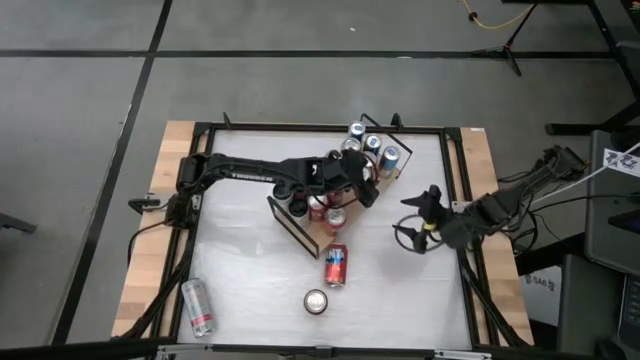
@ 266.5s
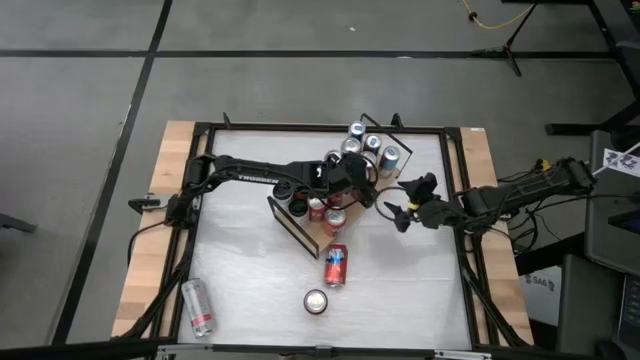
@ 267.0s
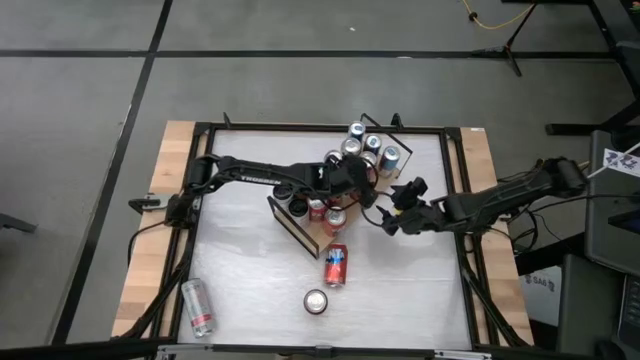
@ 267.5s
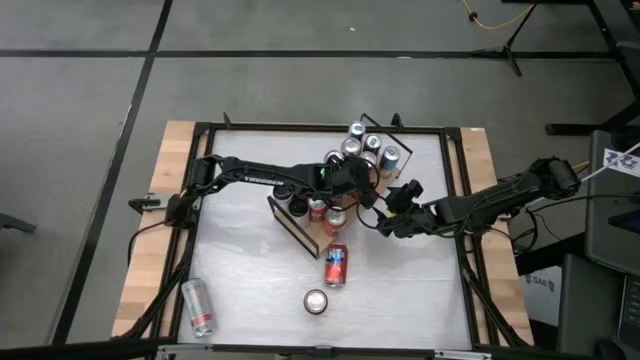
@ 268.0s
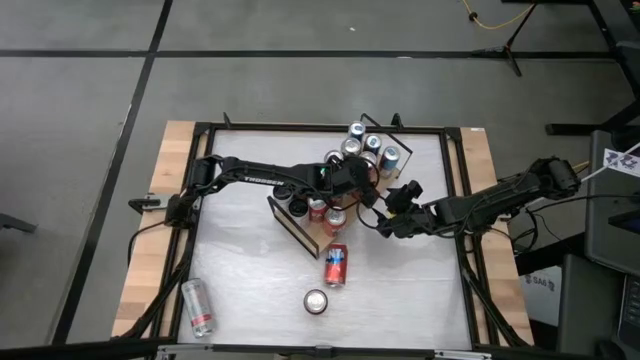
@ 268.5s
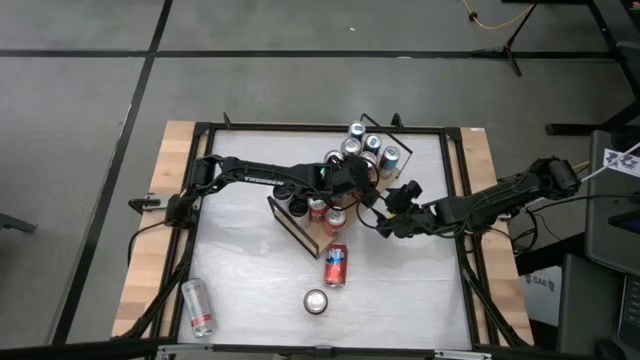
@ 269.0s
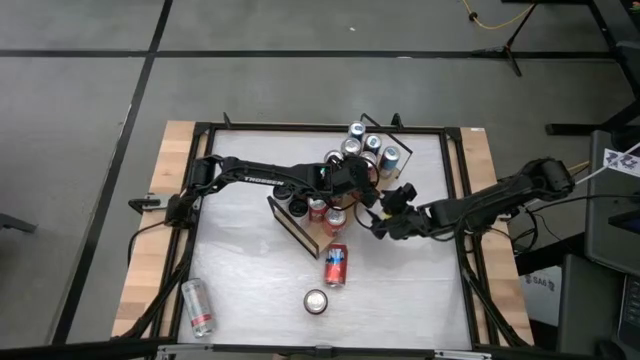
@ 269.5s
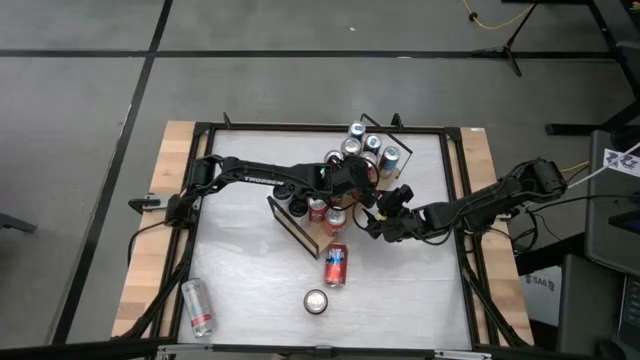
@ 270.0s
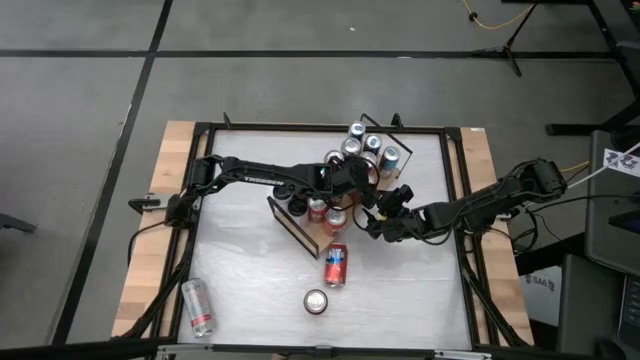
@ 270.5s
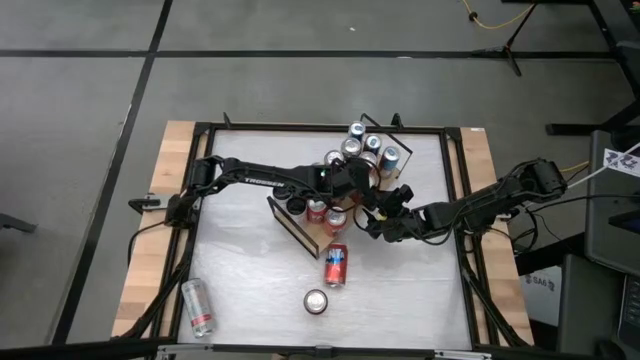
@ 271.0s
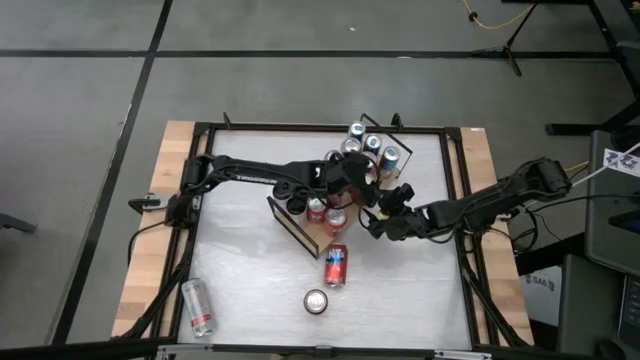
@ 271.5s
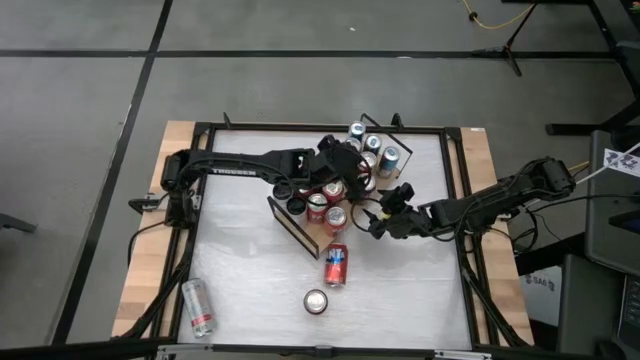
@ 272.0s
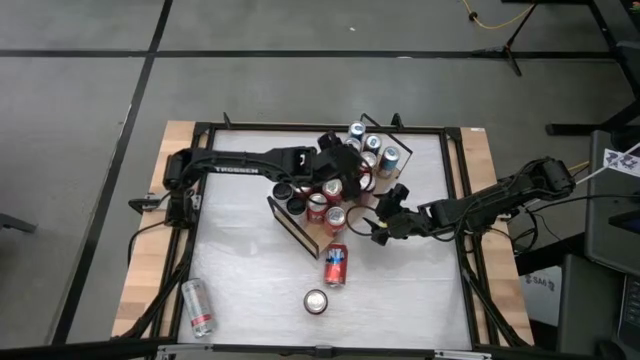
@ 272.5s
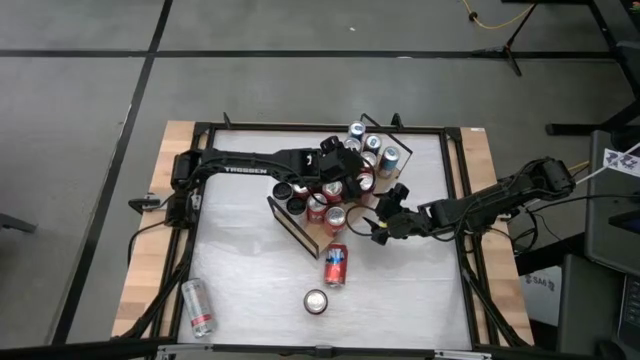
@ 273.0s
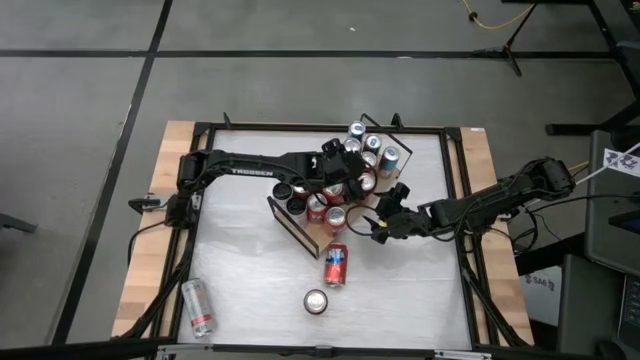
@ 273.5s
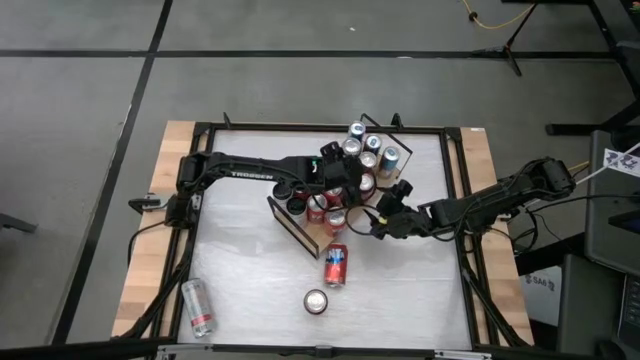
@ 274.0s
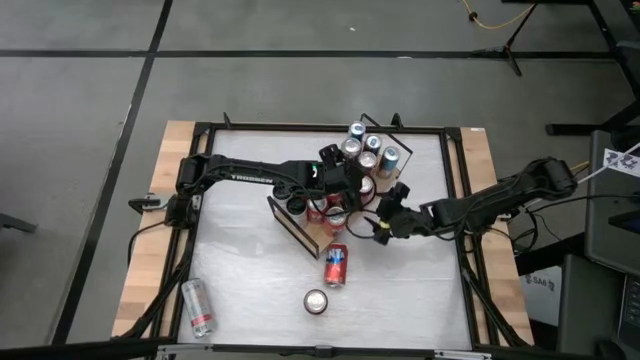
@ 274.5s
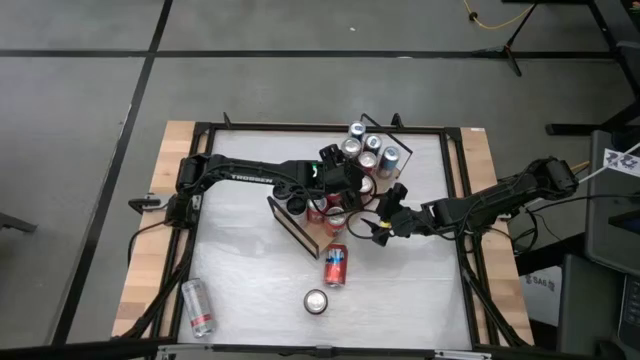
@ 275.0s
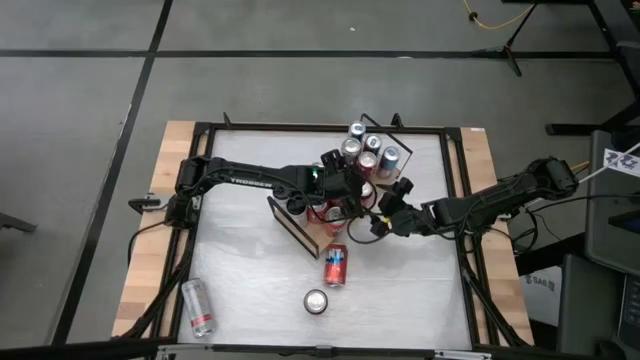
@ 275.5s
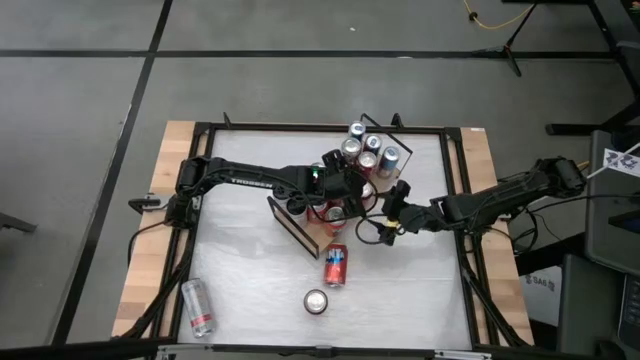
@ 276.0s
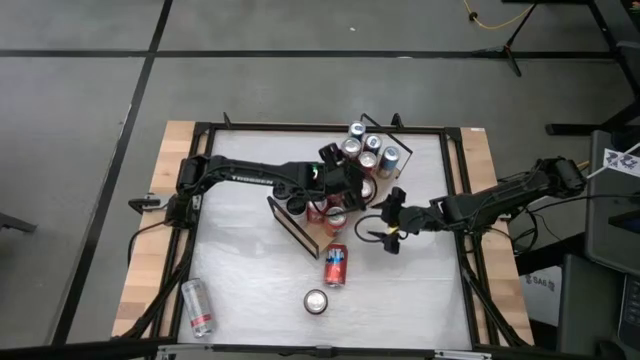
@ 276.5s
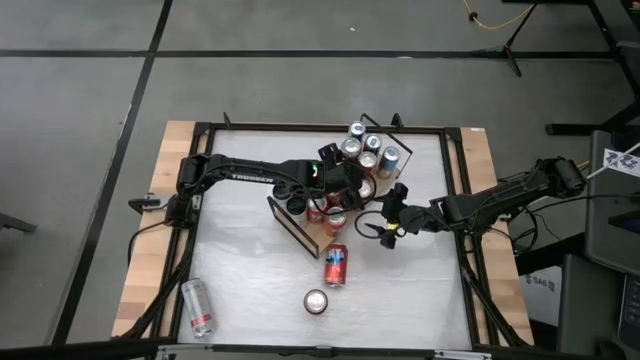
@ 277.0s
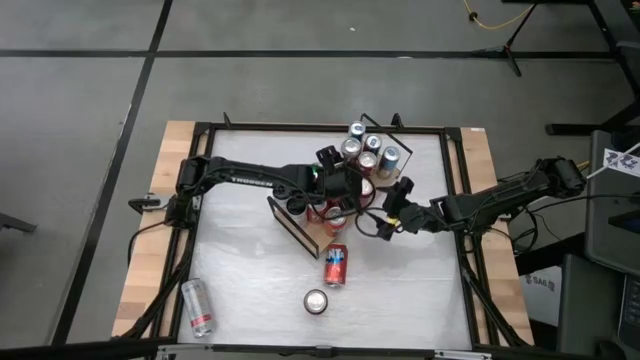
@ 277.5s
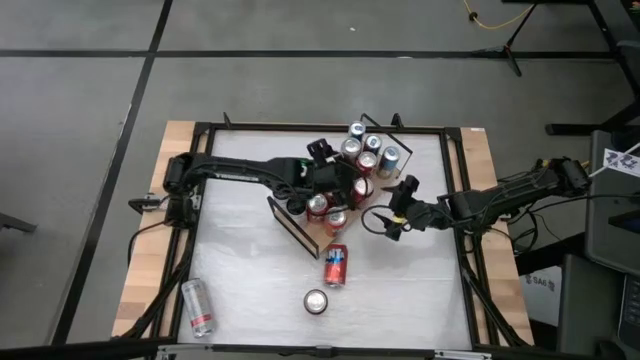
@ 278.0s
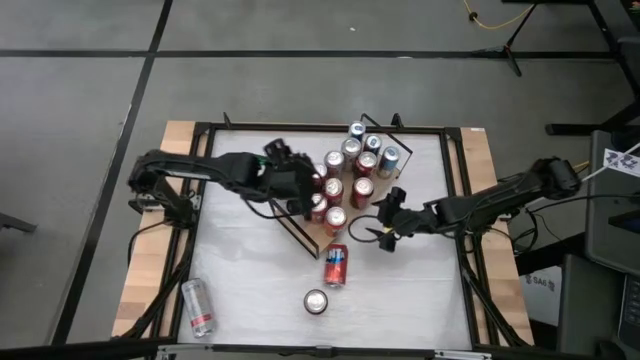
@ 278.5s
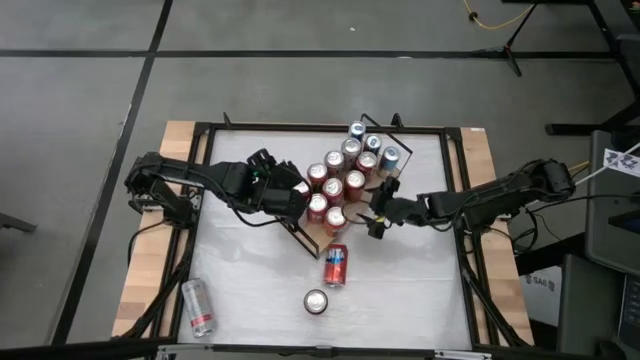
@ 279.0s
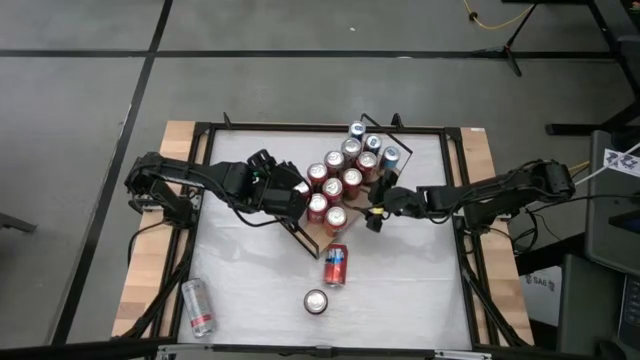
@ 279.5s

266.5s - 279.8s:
Task: Place canned beverage on shelf
Put the red black soda can on the shelf

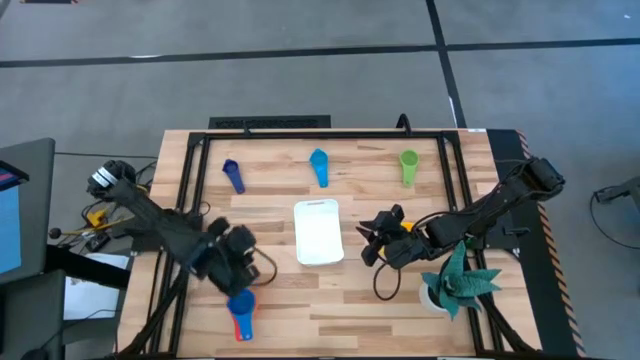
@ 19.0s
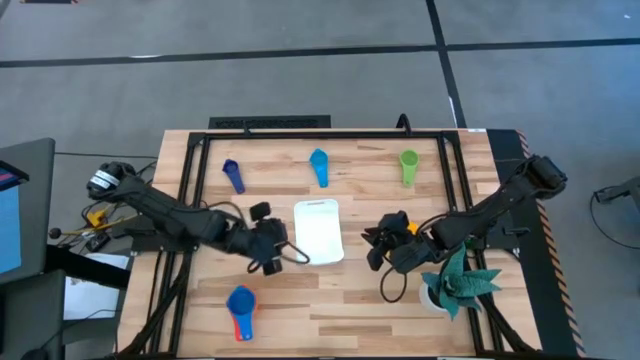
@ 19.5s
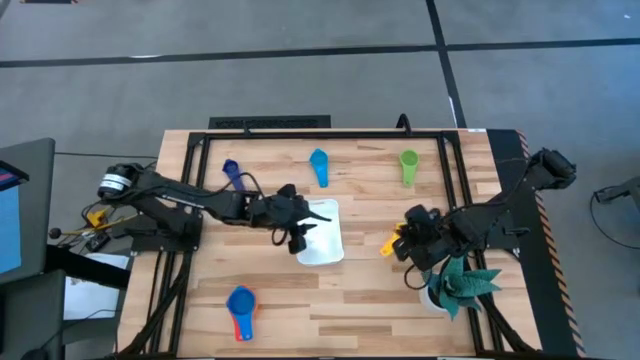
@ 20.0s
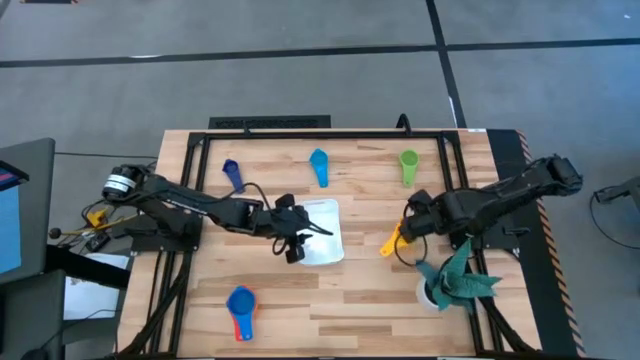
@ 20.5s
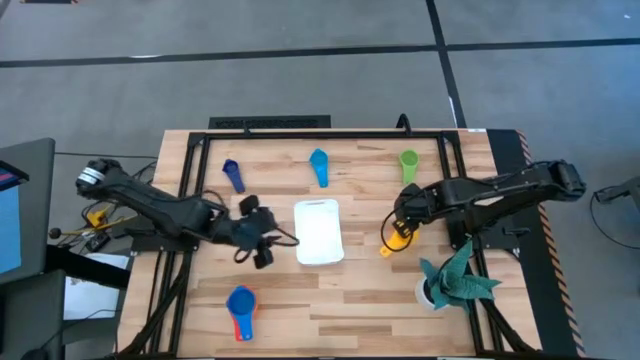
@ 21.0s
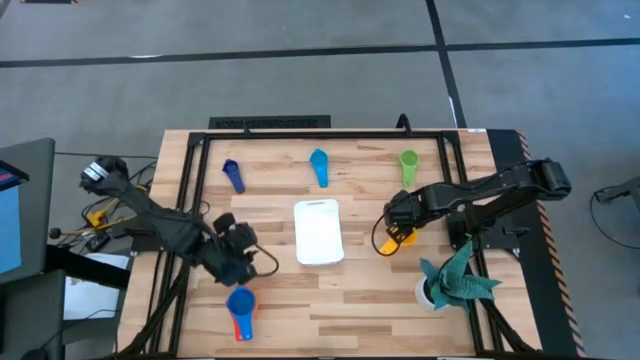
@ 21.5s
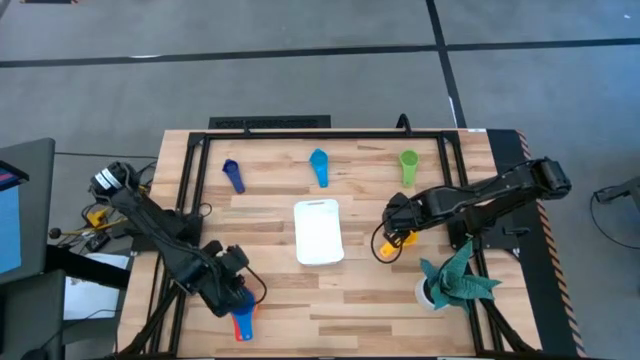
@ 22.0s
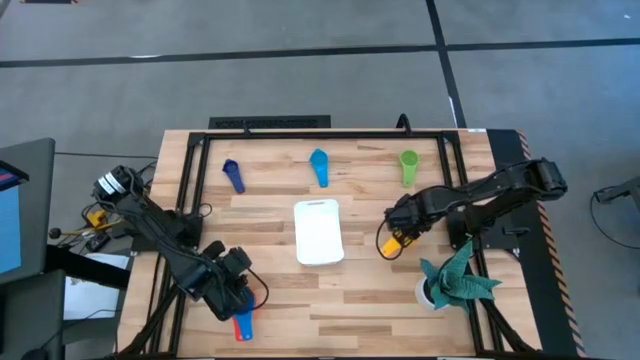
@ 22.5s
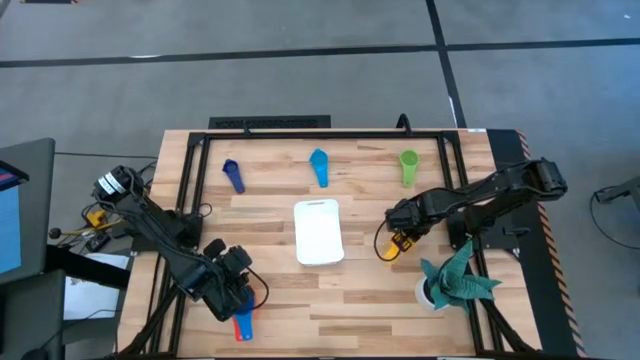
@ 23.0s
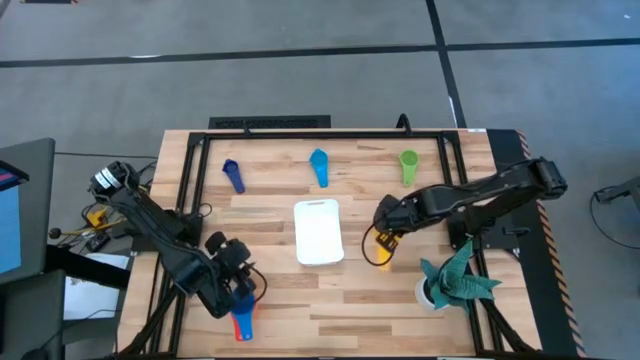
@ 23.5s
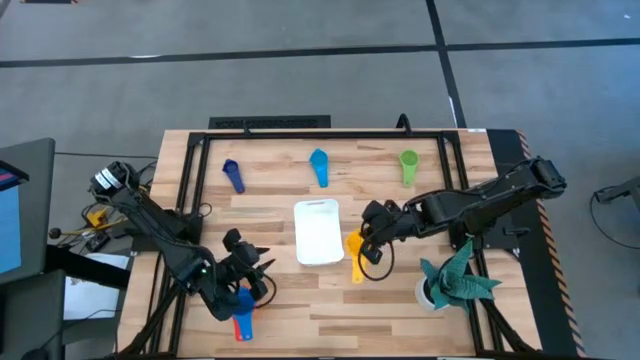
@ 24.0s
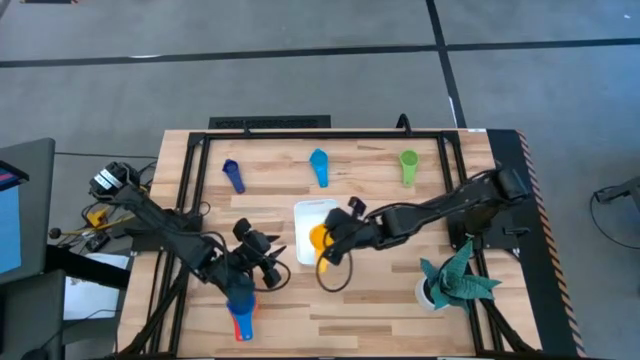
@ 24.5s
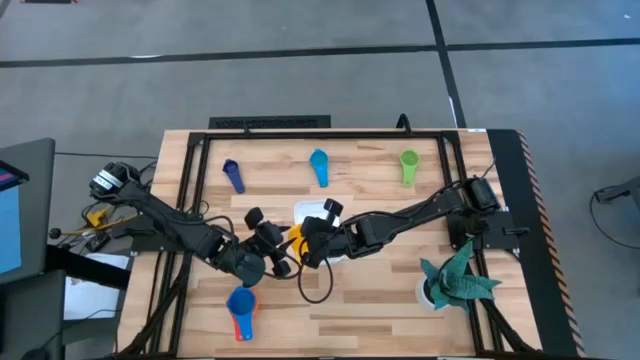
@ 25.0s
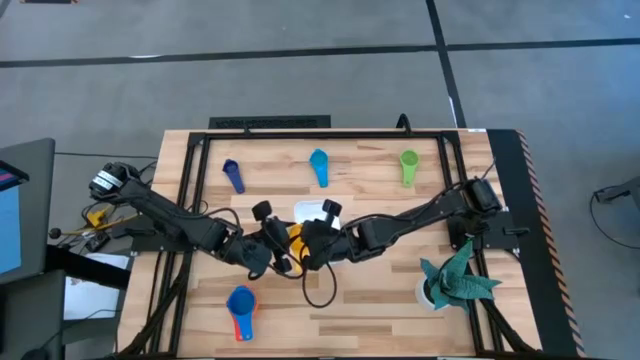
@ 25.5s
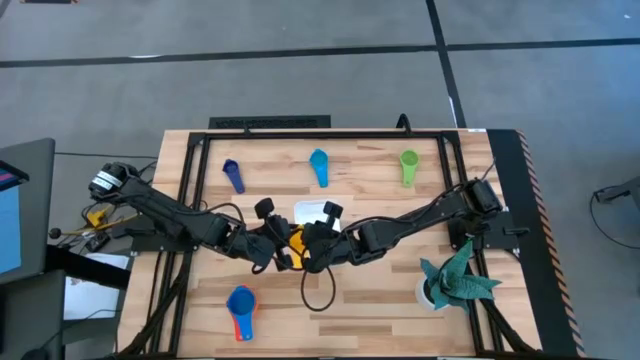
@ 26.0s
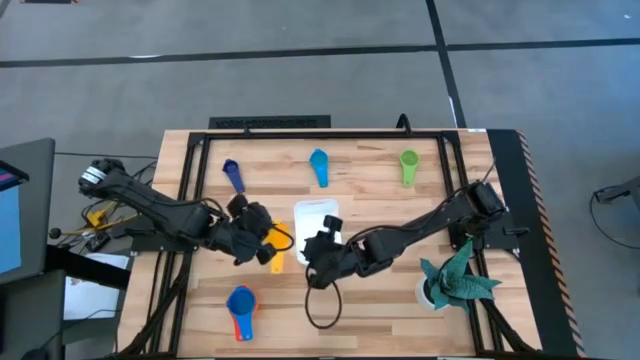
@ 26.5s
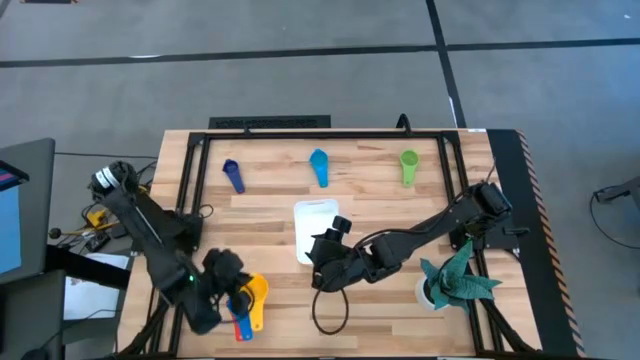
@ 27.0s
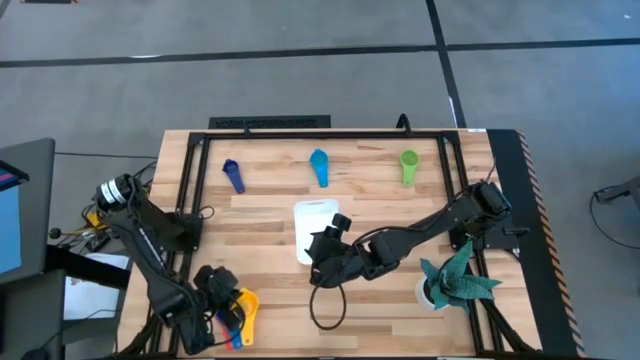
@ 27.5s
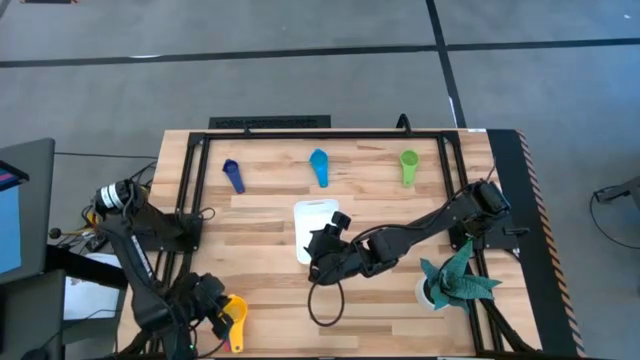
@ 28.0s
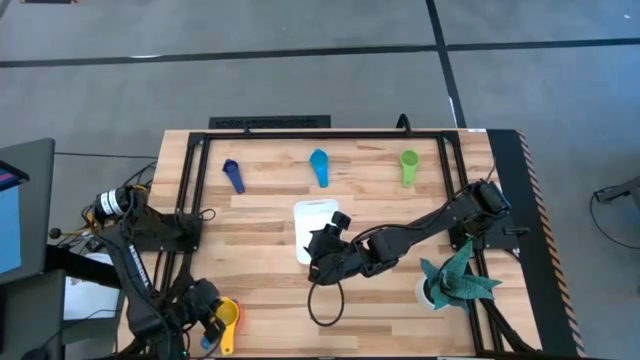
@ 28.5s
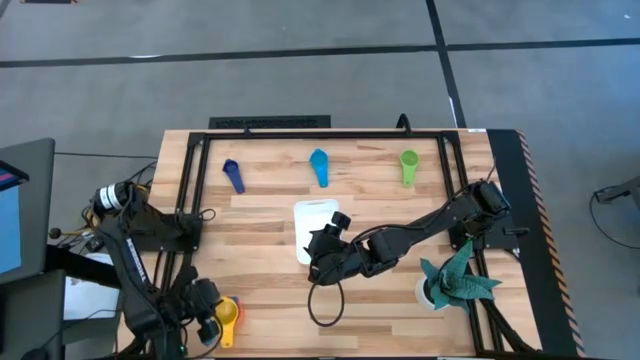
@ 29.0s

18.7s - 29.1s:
Task: Nest measuring cups in basket
Stack the yellow nest measuring cup into the blue nest measuring cup
